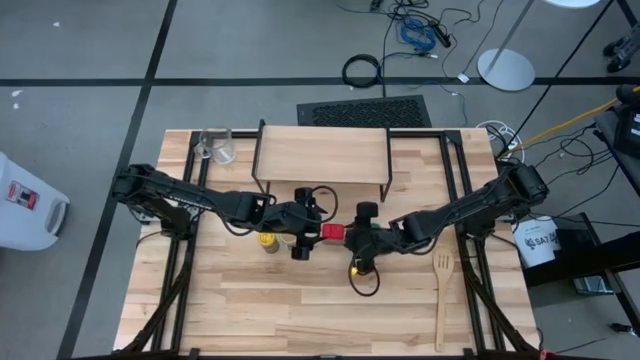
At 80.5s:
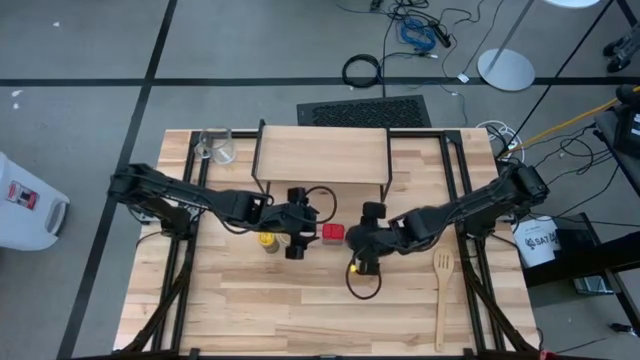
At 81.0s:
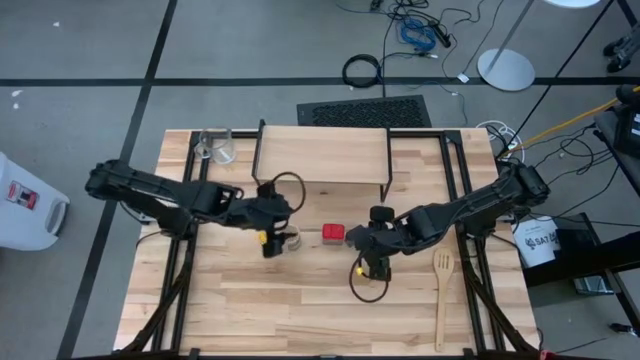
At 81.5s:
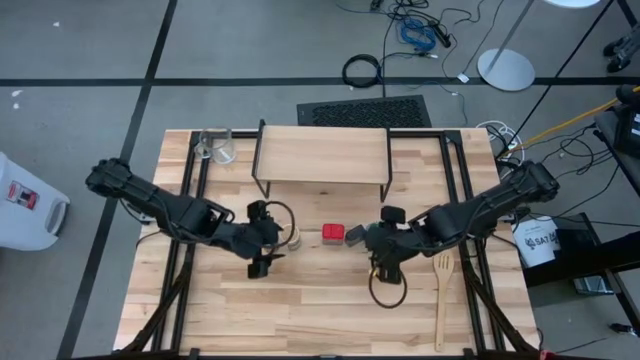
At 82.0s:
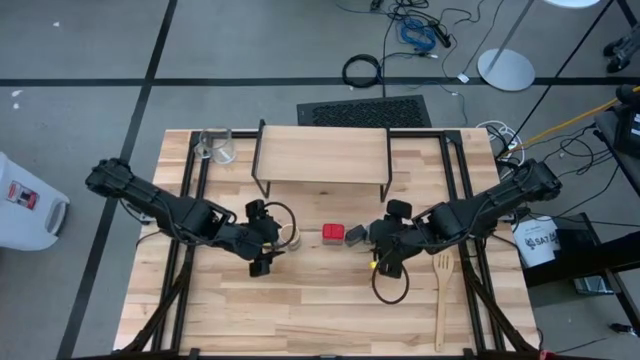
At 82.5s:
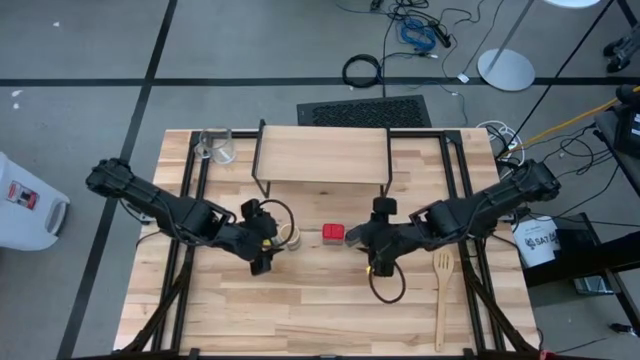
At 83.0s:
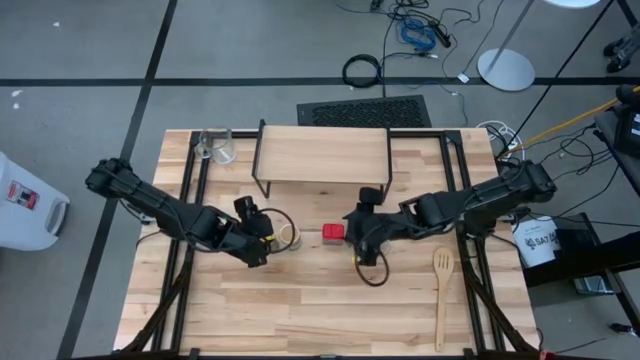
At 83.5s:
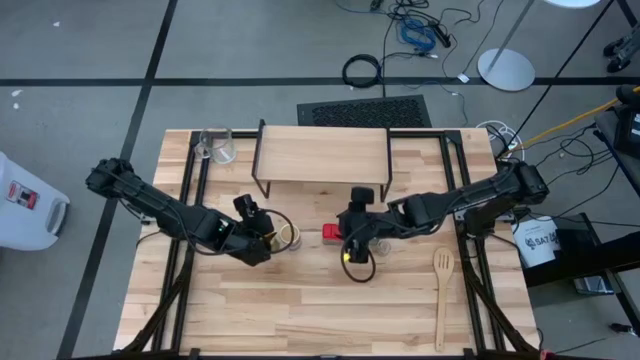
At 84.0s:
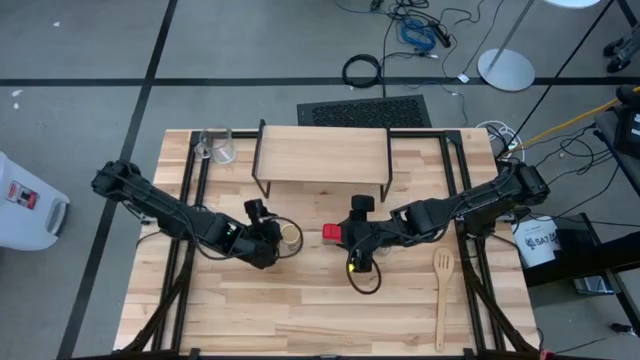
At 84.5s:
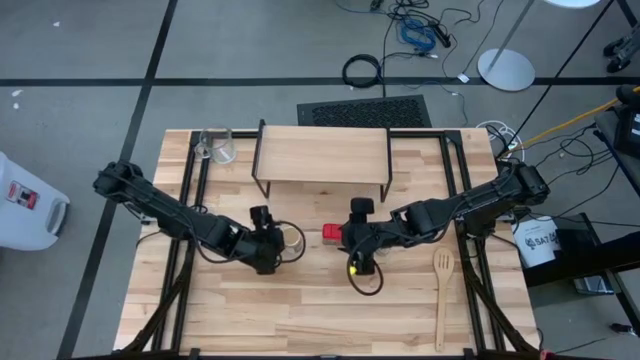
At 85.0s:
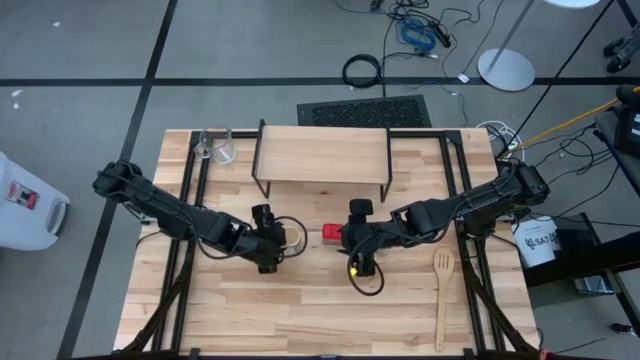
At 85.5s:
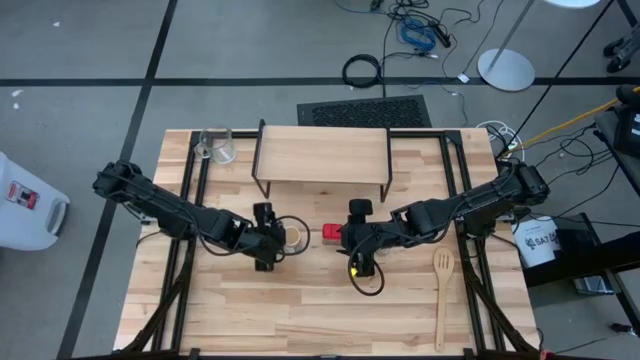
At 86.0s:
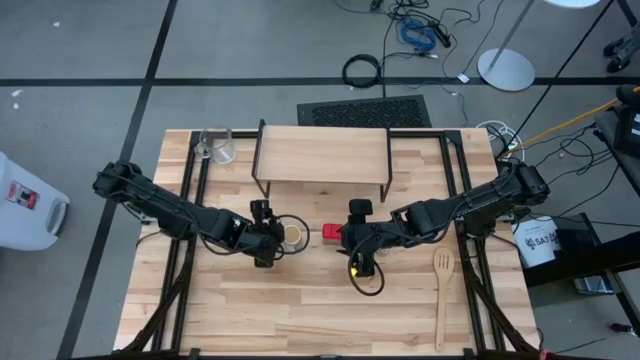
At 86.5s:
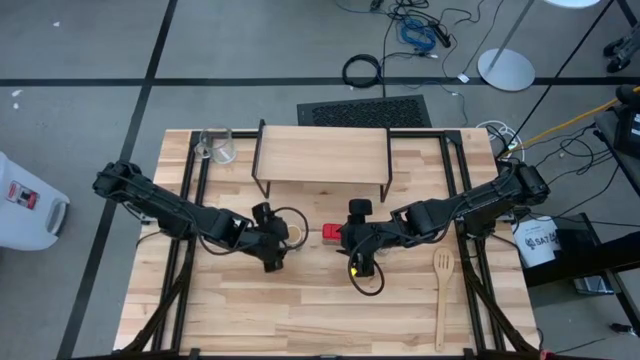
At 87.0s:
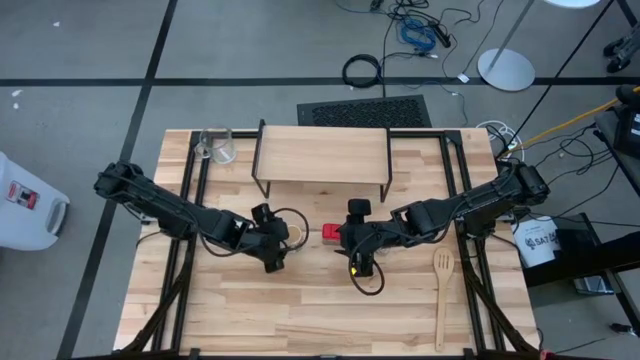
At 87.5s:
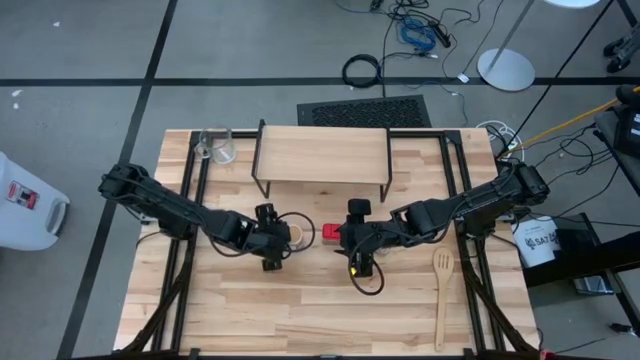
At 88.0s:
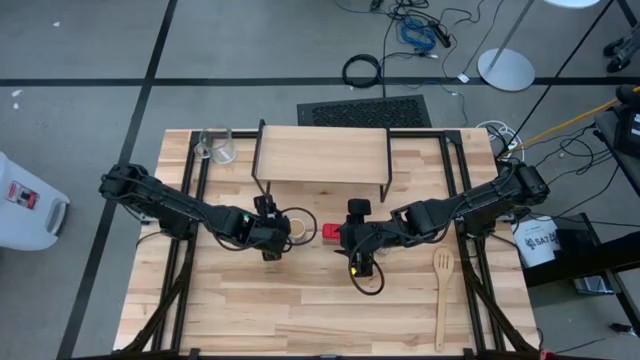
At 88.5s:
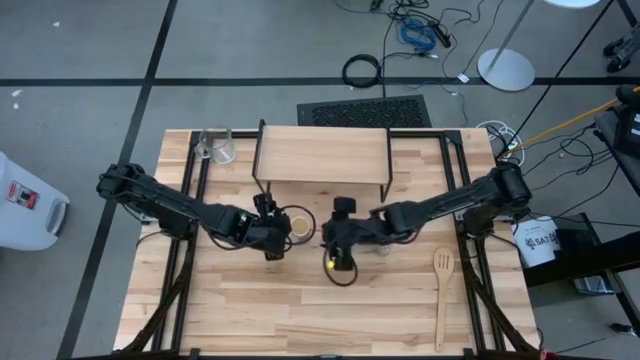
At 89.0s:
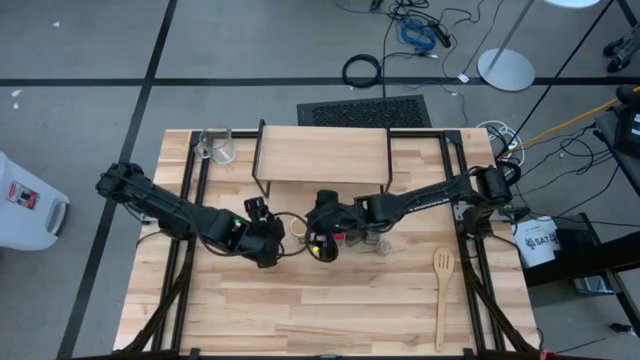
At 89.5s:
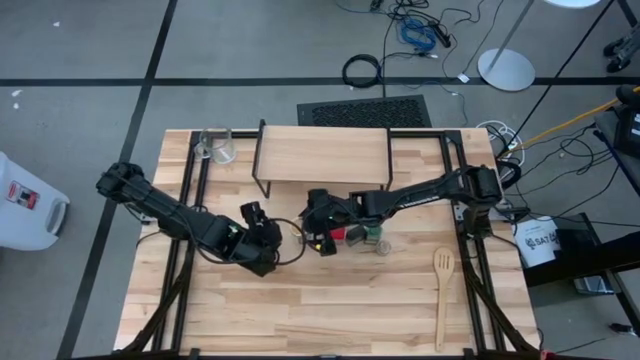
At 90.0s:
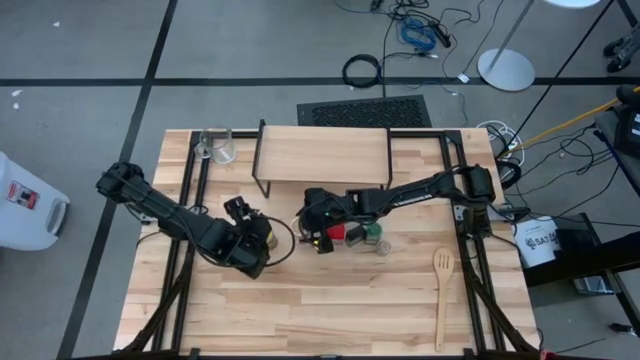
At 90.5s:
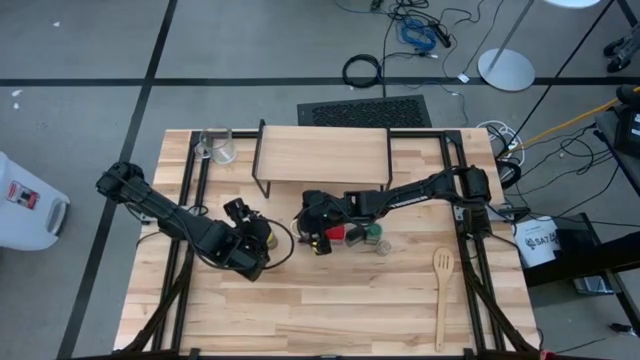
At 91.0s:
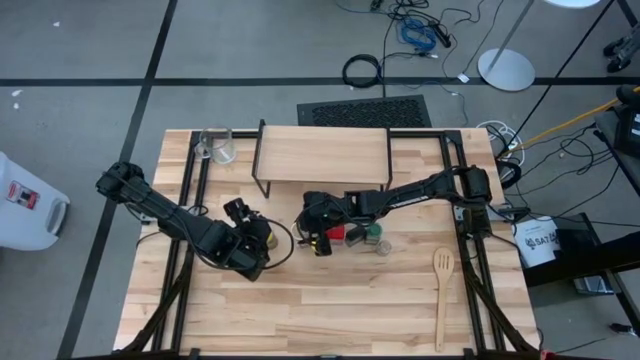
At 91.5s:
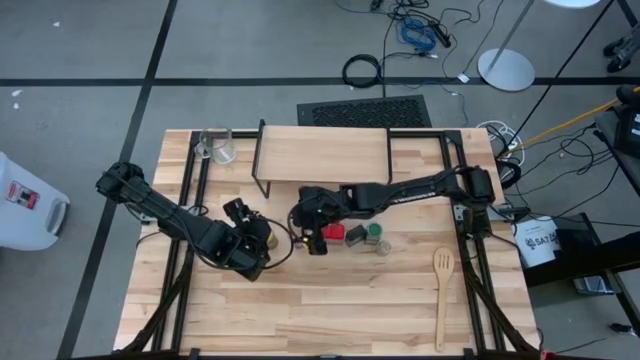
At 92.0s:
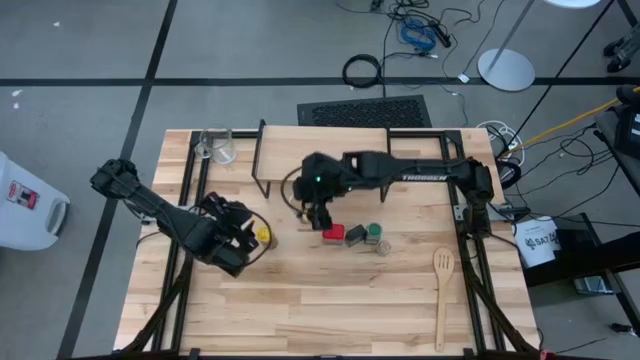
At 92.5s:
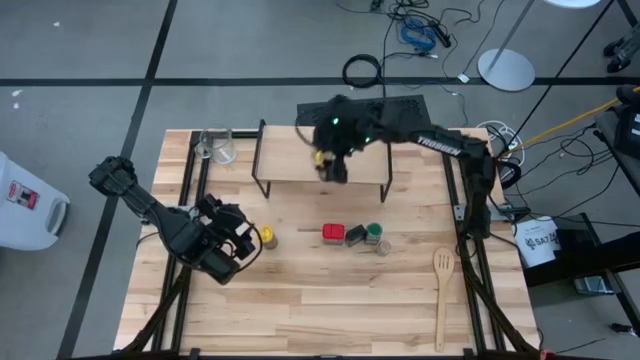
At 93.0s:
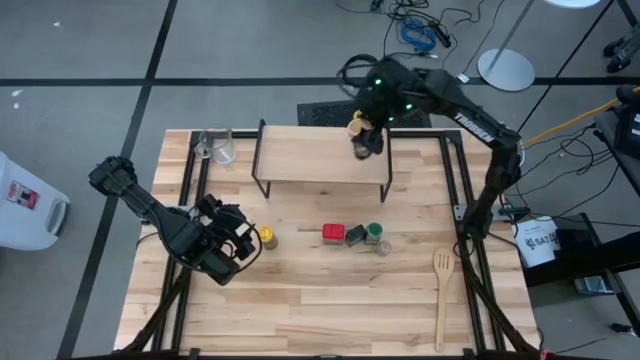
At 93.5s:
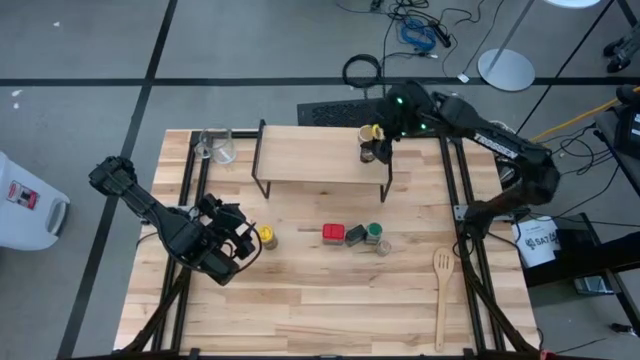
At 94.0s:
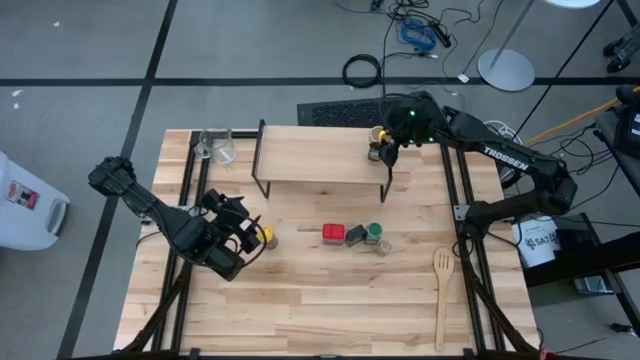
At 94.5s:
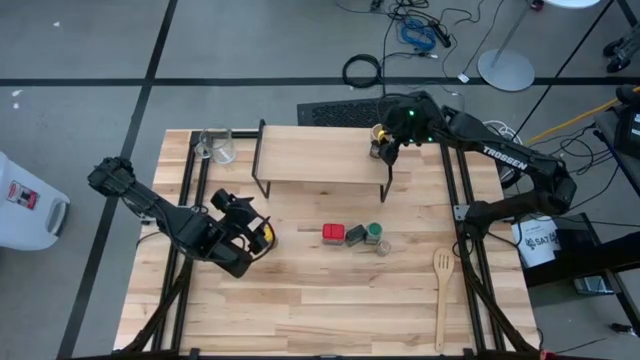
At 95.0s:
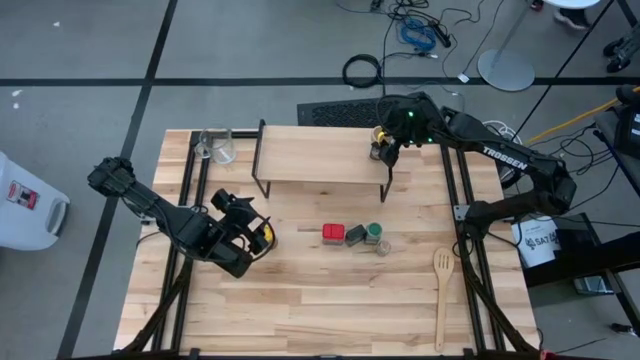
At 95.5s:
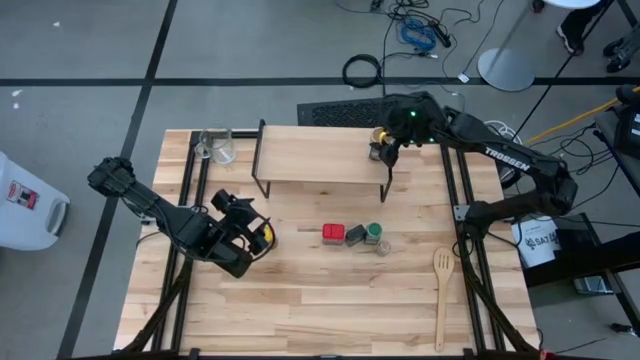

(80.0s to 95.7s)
Task: Shelf spices
Put the gold seasoning bottle on the shelf
